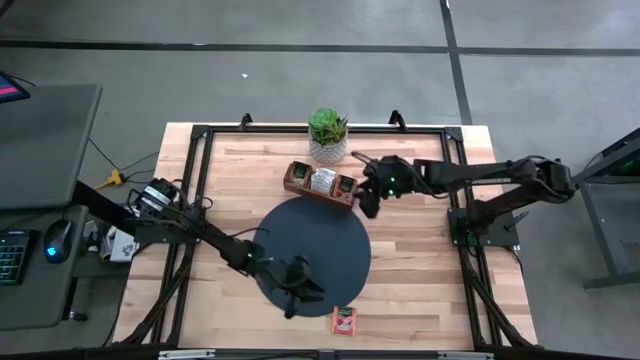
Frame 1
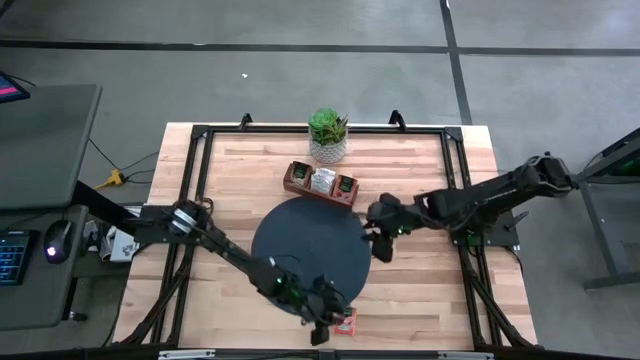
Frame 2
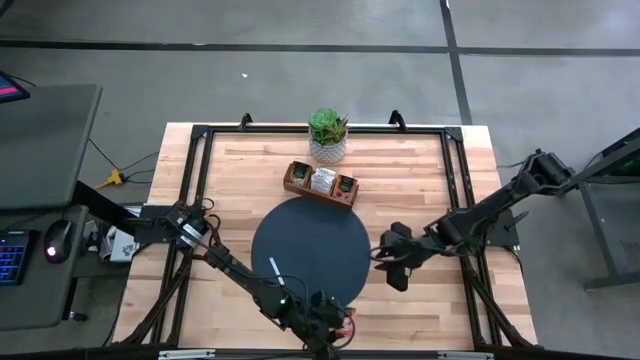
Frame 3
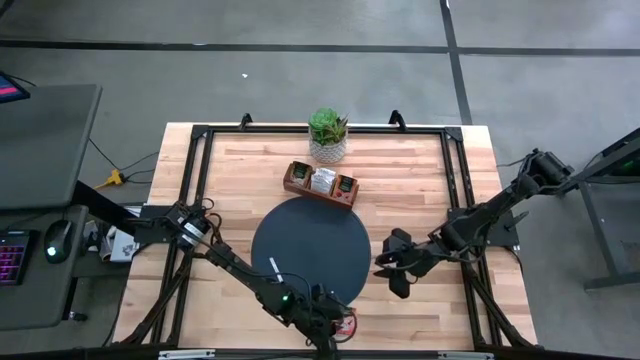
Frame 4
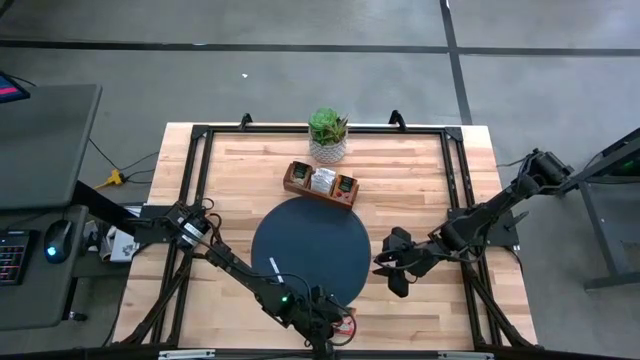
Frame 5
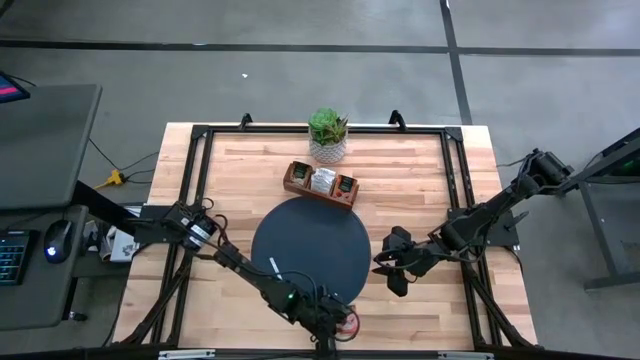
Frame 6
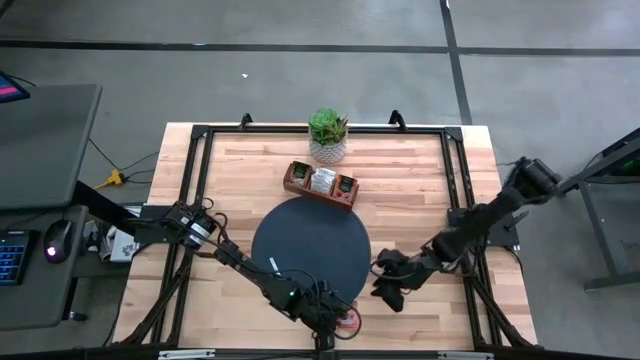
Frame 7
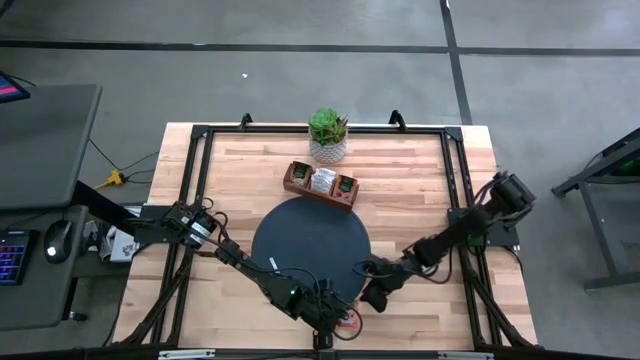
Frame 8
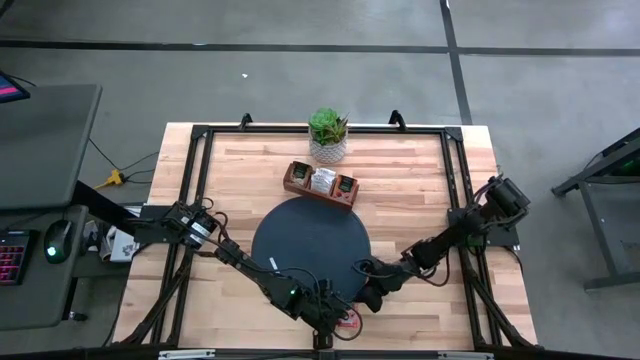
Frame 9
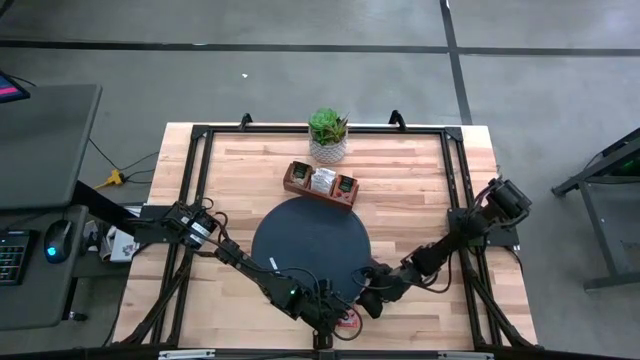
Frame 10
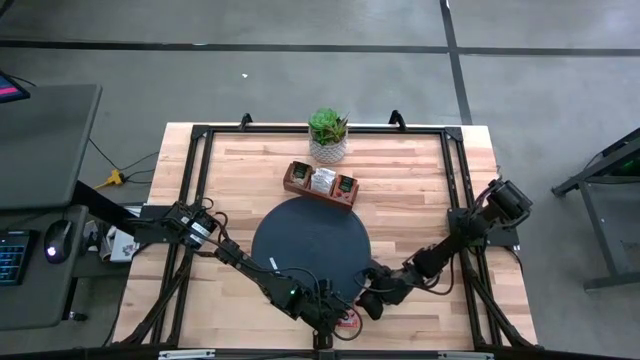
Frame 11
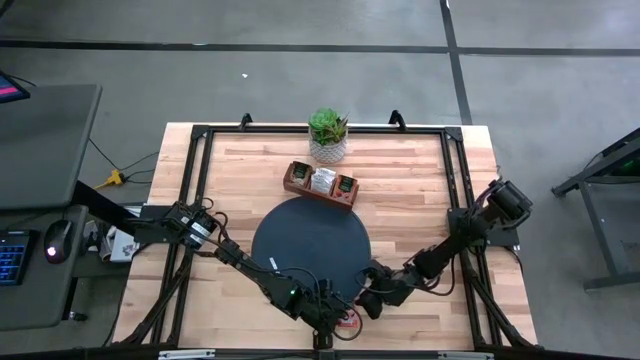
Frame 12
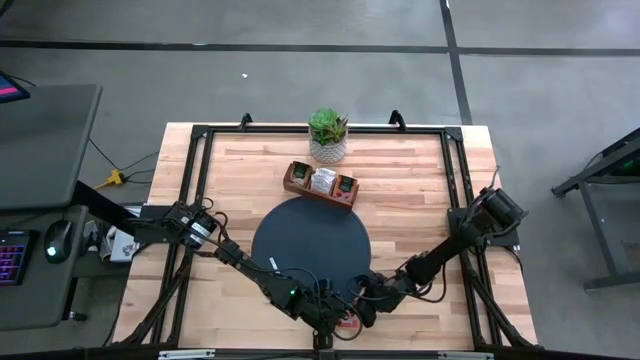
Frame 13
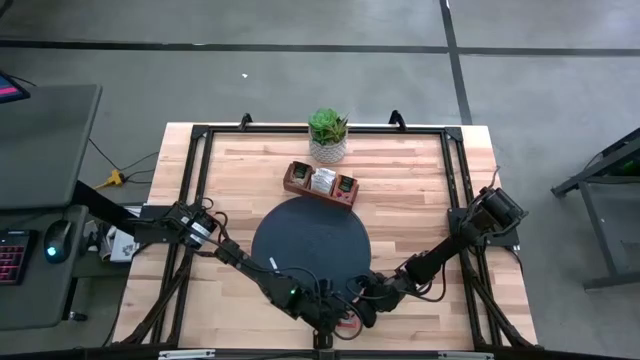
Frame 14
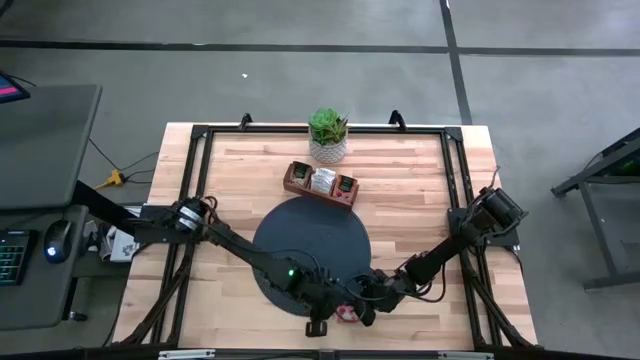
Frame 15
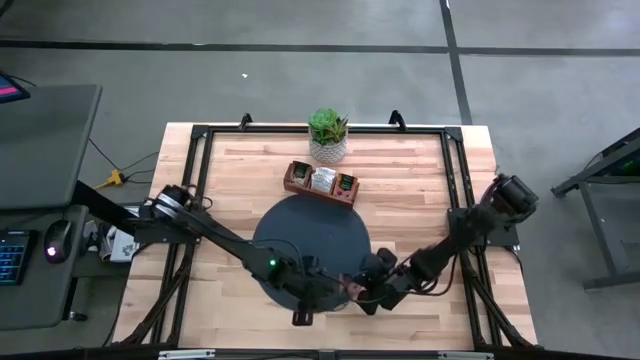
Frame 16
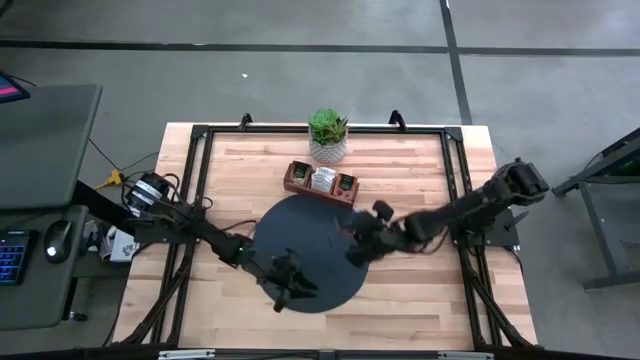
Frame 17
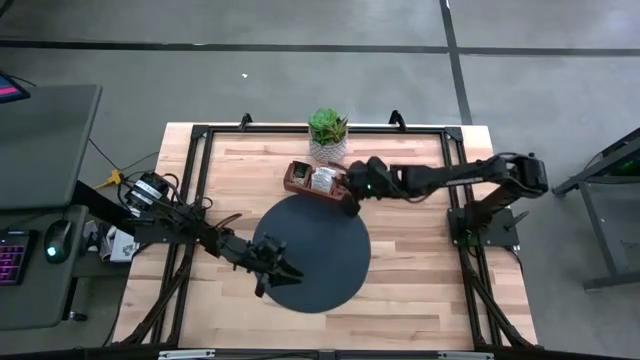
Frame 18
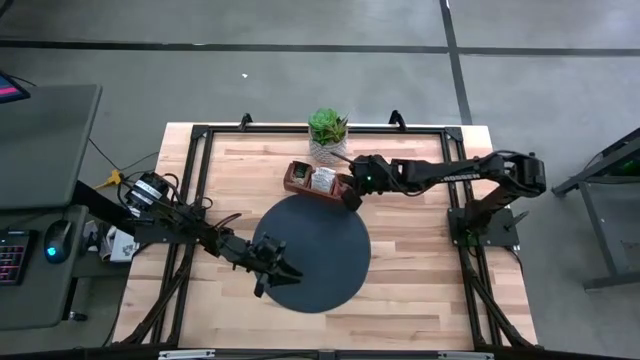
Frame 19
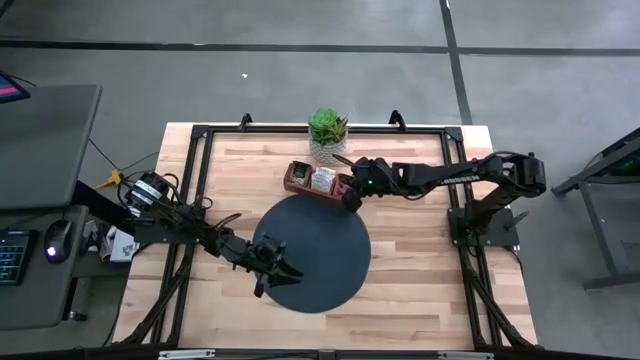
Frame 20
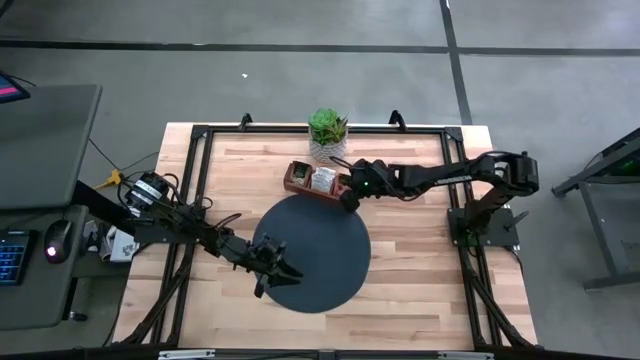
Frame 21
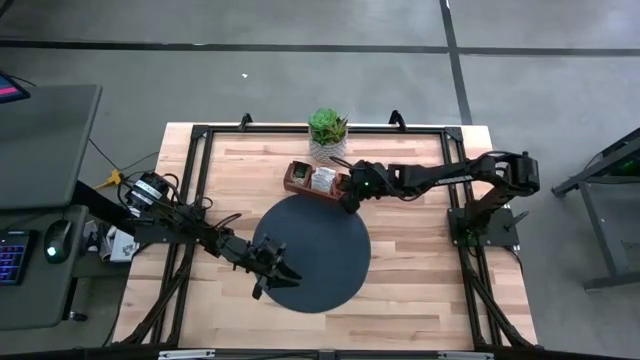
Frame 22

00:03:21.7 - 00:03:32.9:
Task: Pick & Place Tea
Put the orange tea bag into the right section of the wooden organizer

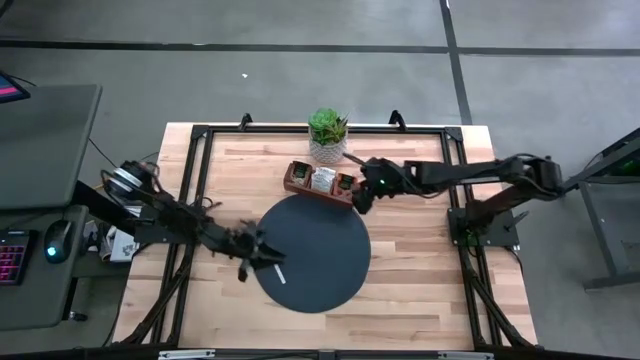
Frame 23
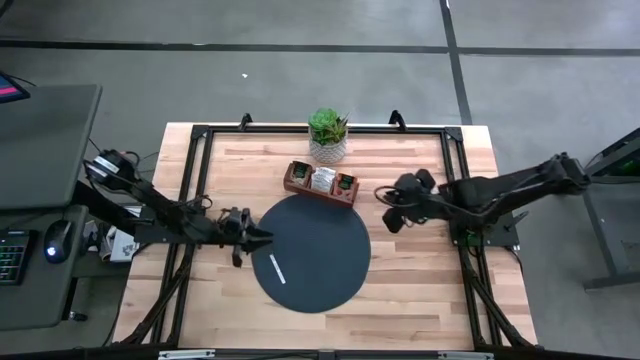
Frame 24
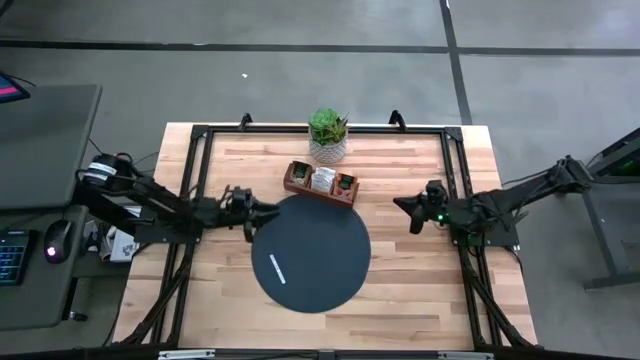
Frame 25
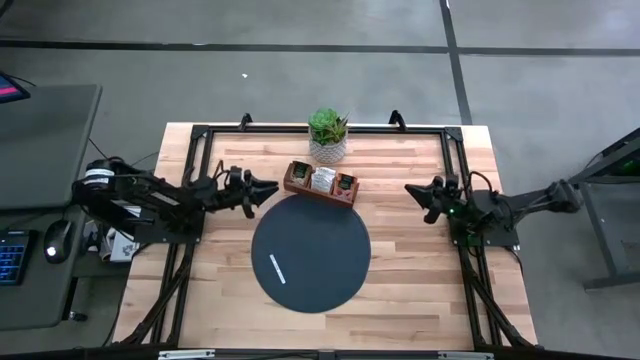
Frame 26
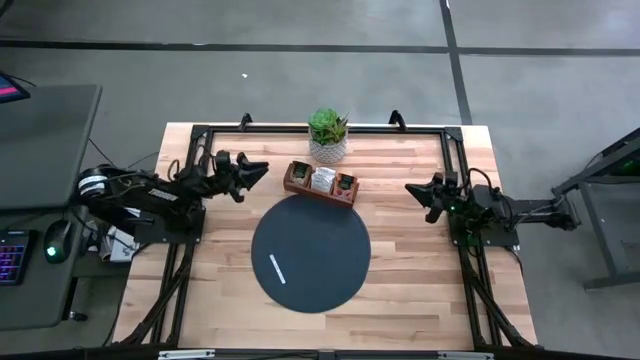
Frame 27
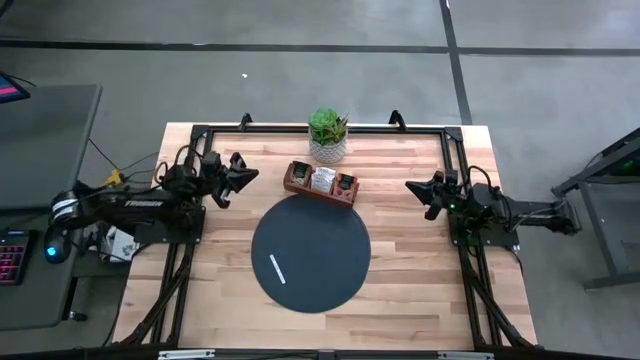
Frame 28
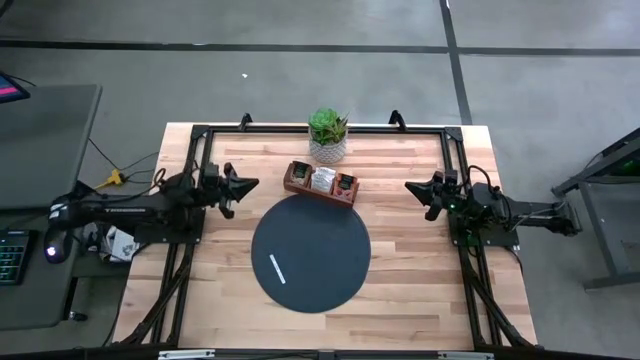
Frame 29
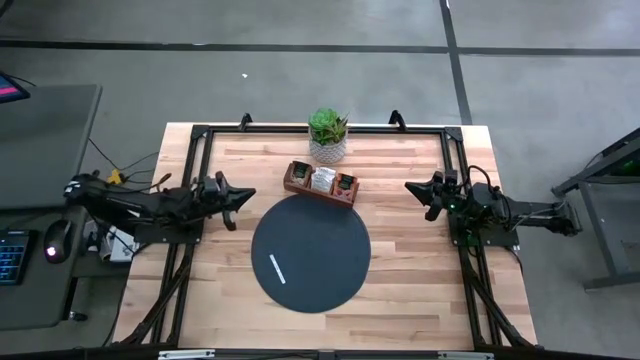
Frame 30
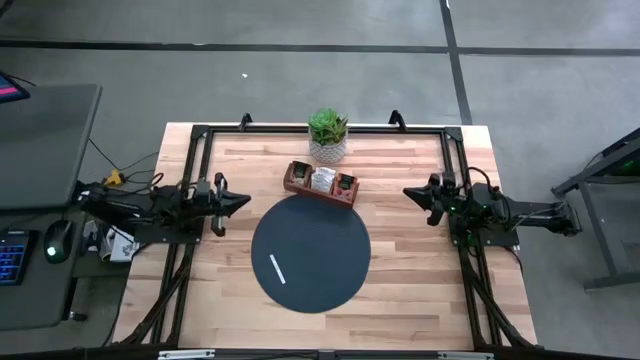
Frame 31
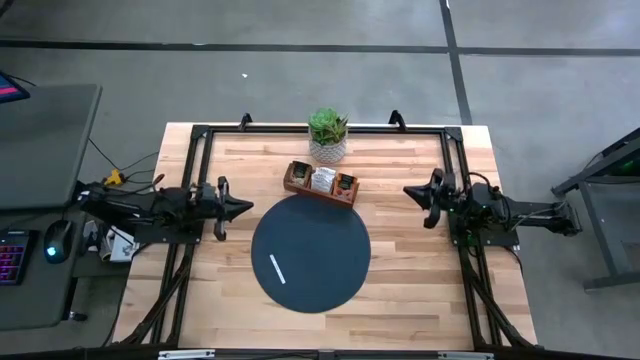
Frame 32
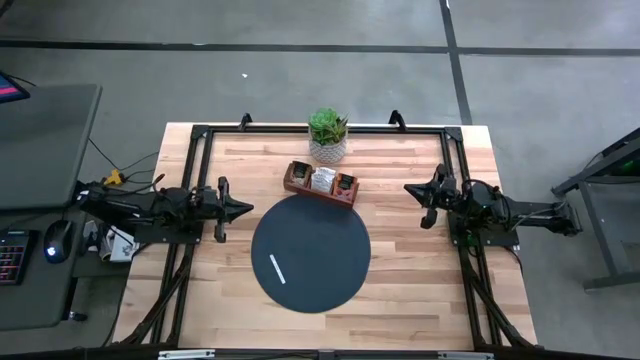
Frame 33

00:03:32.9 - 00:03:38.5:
Return to Home Position

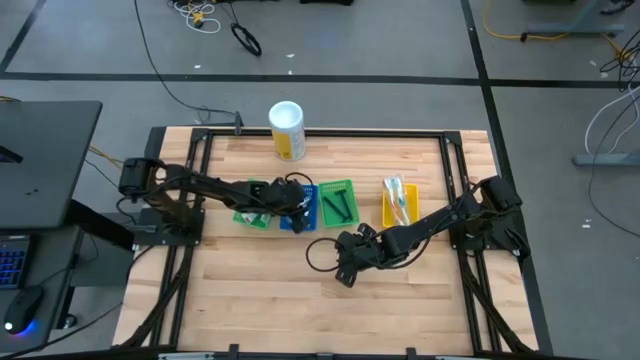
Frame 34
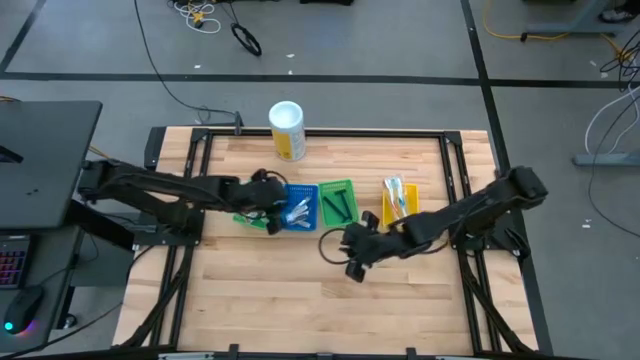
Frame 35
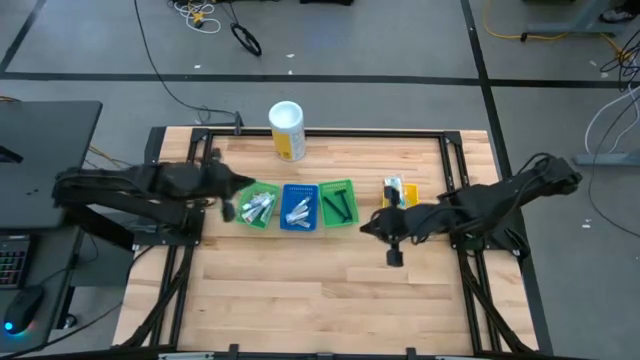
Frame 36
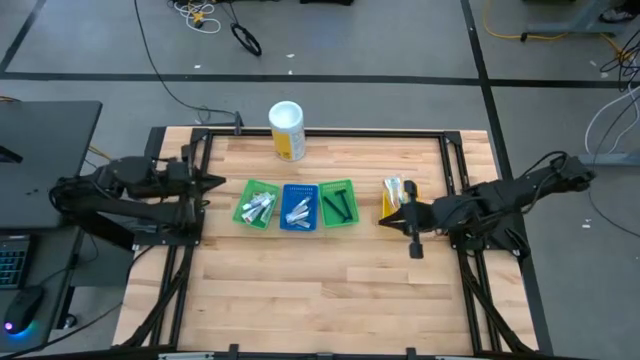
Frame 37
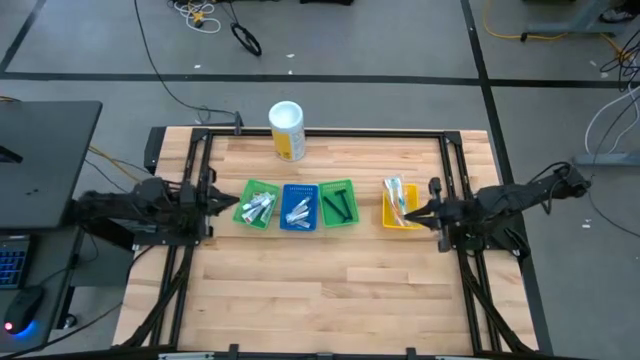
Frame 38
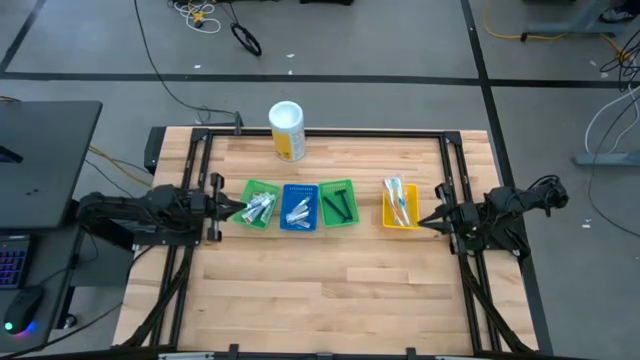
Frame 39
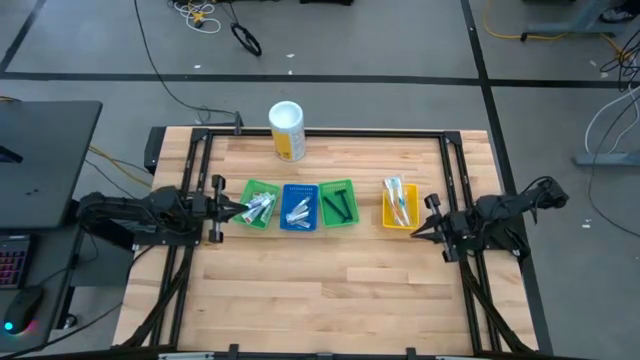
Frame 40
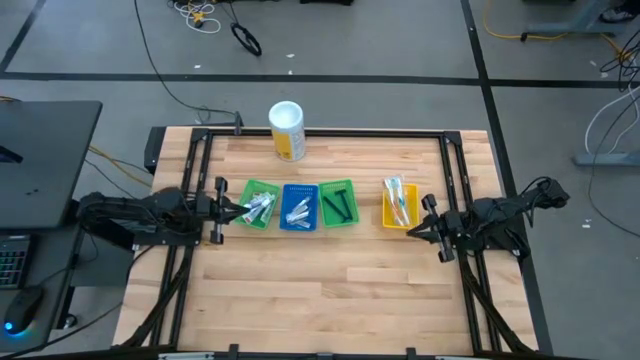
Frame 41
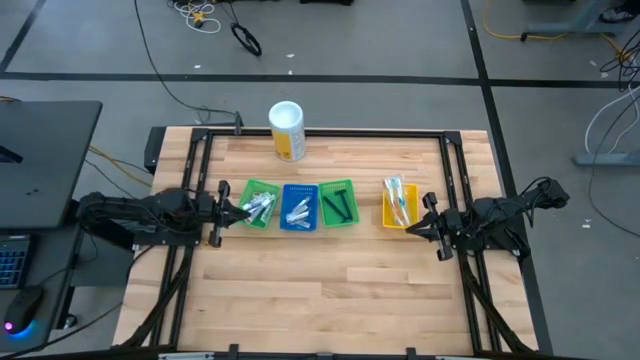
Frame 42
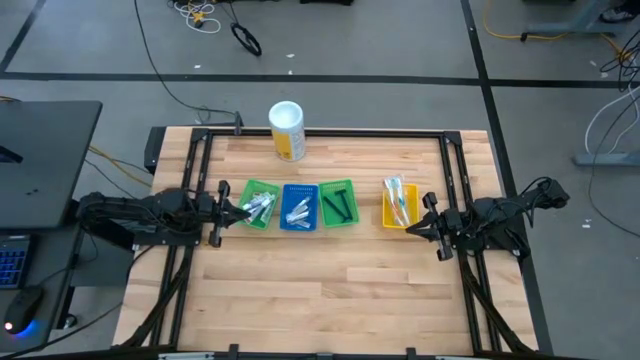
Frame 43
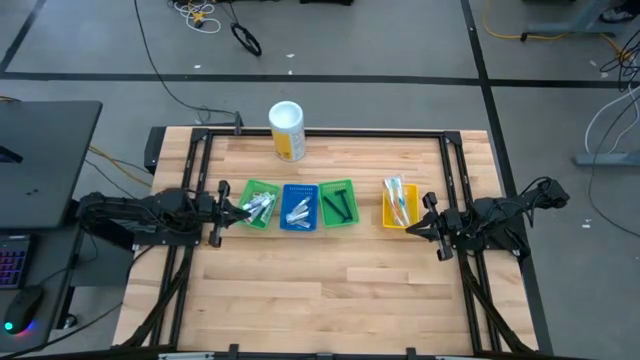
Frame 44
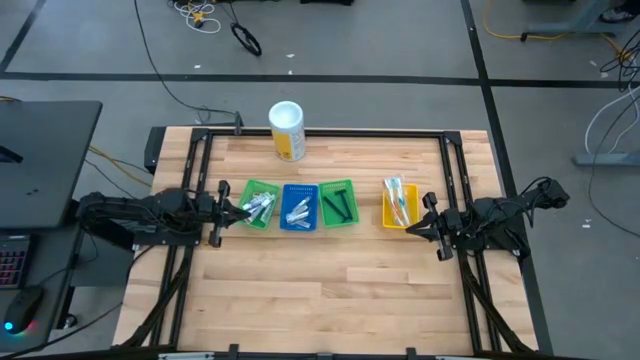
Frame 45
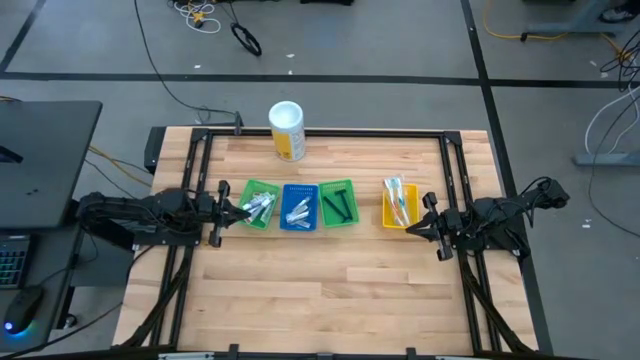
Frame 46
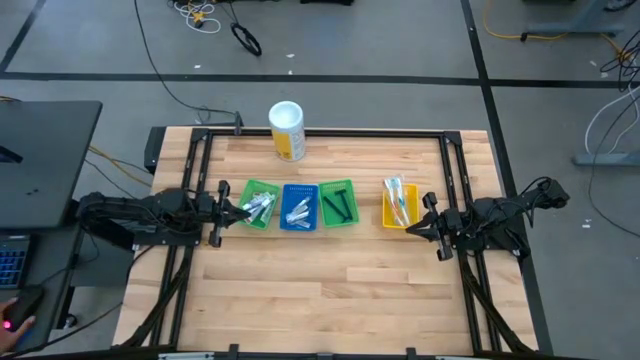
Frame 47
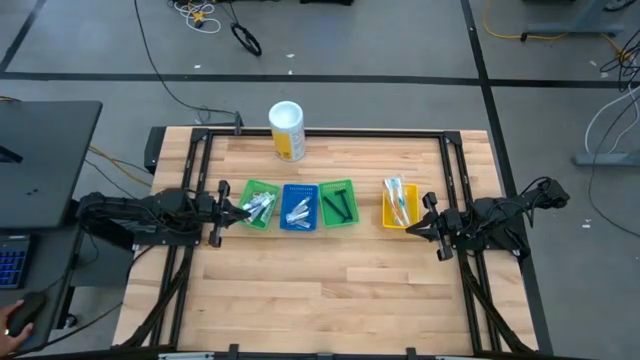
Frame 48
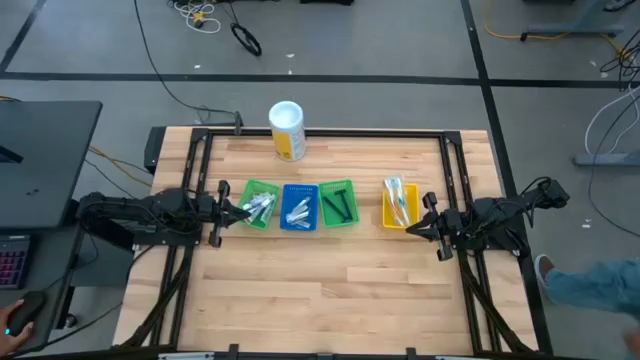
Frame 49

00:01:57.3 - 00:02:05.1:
Task: Pick & Place Travel size toiletries
Return to Home Position
